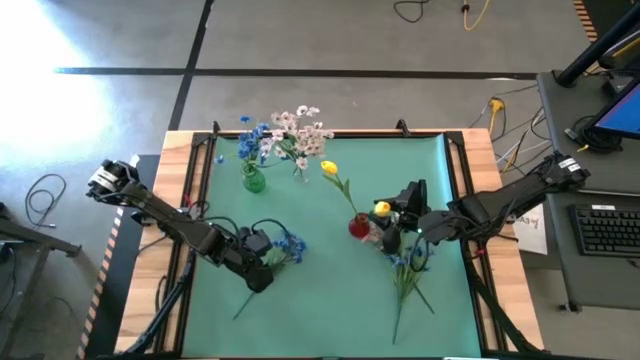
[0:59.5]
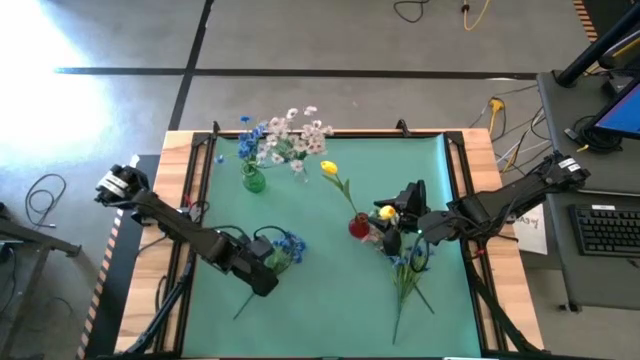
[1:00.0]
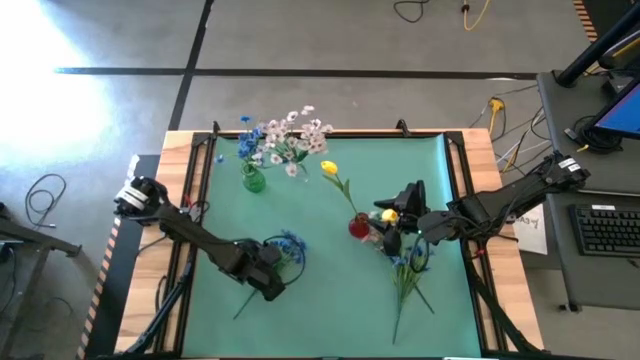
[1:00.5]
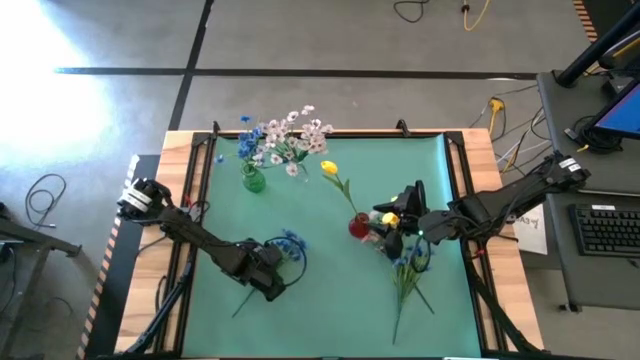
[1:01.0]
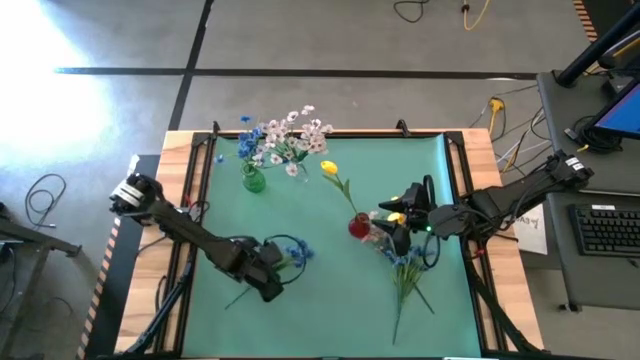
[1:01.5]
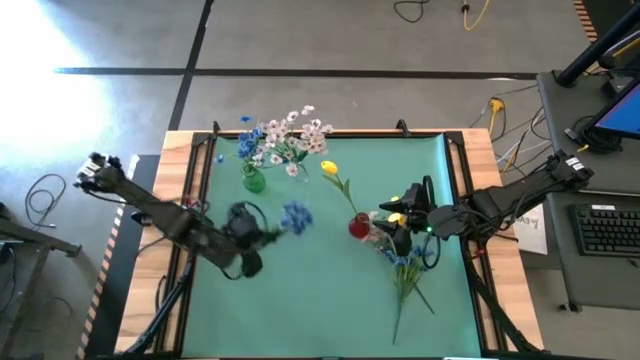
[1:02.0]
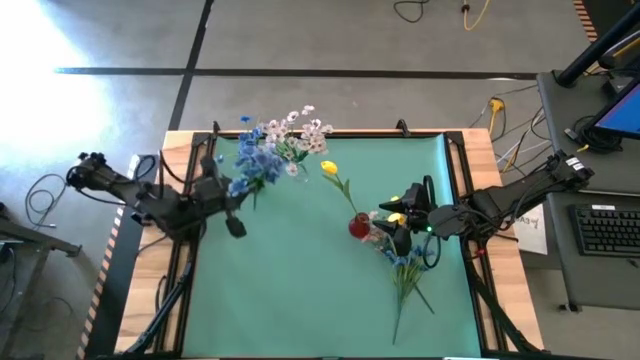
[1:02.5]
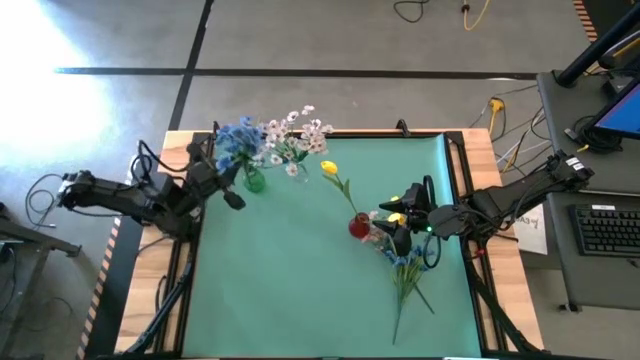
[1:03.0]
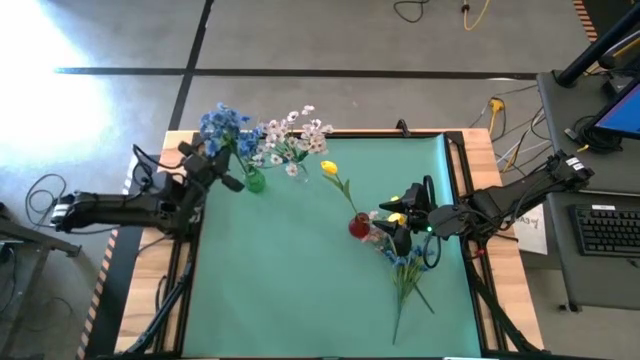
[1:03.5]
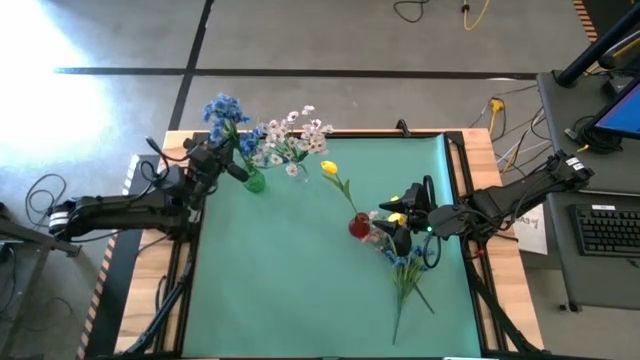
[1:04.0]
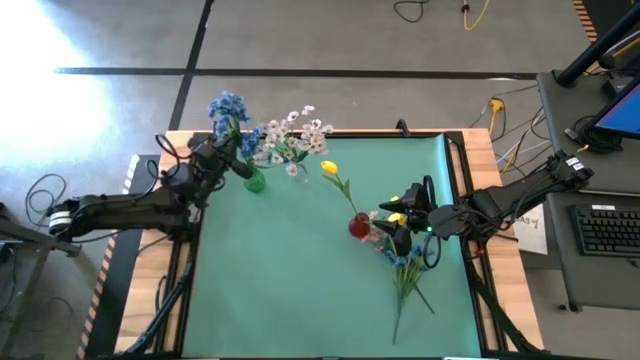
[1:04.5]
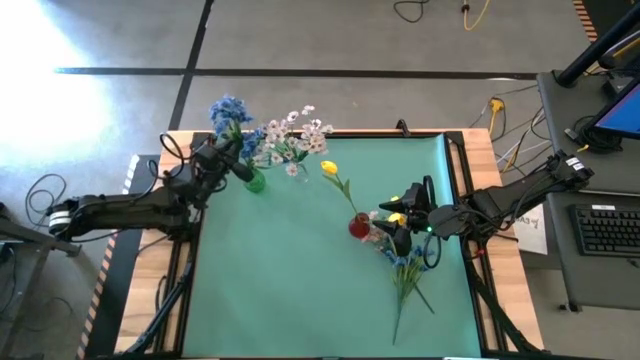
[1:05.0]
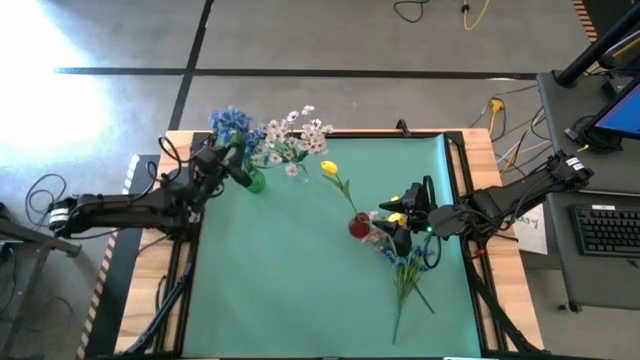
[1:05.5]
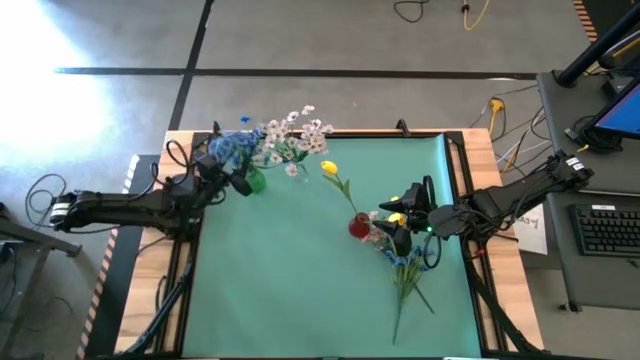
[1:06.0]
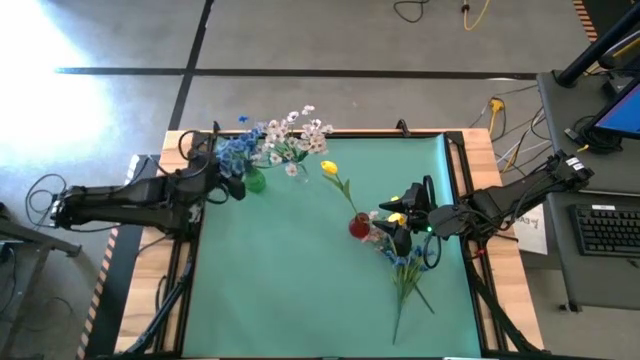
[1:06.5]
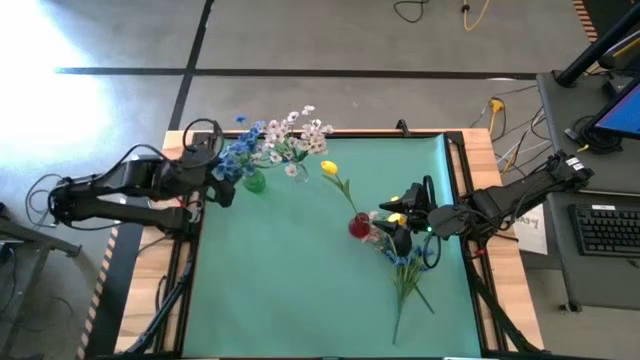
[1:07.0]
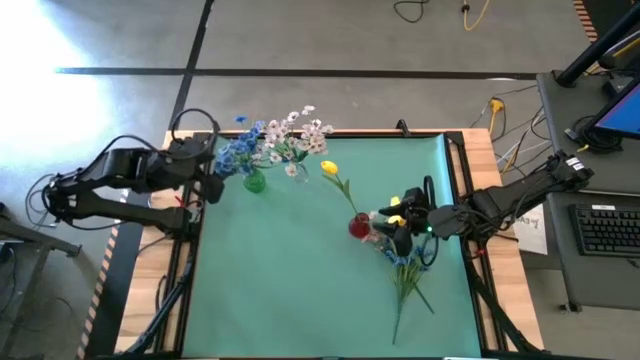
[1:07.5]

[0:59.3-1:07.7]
Task: Sort flowers into vase by color
Put the left blue flowers into the green vase

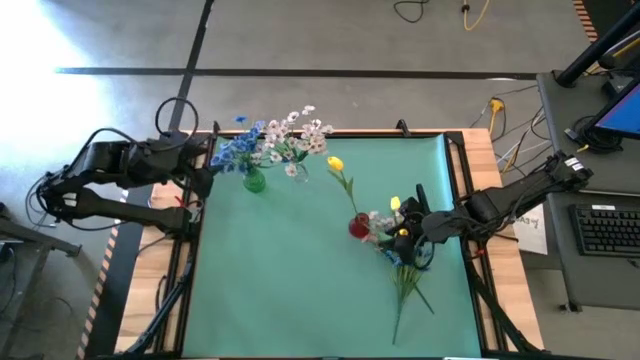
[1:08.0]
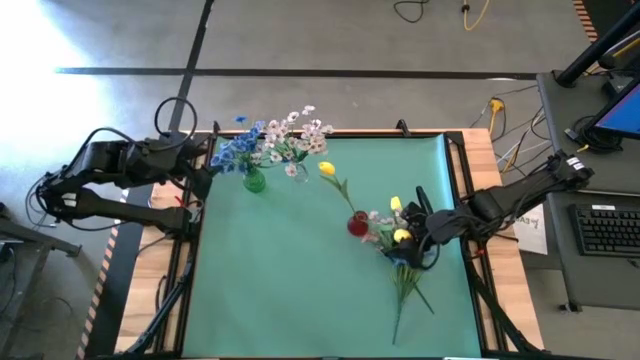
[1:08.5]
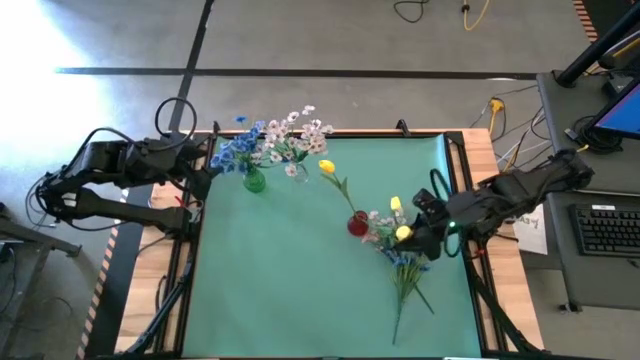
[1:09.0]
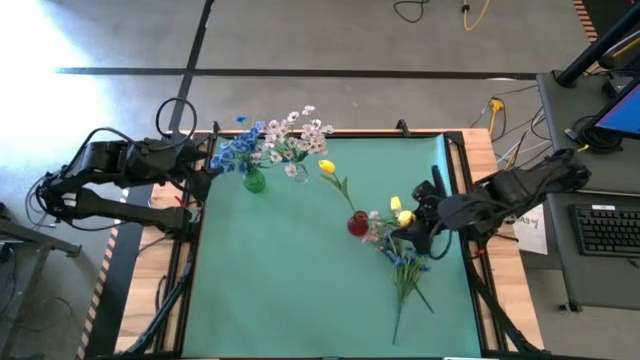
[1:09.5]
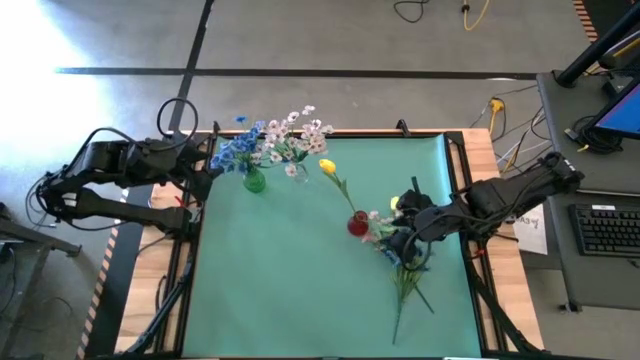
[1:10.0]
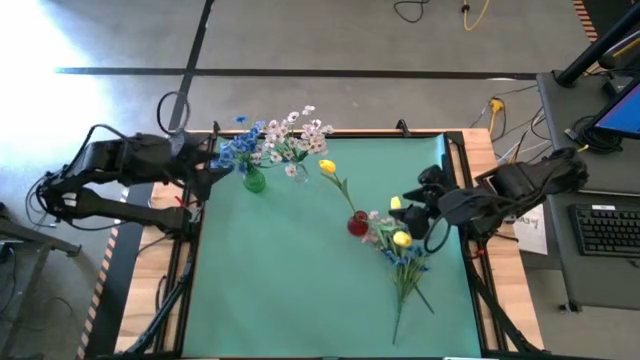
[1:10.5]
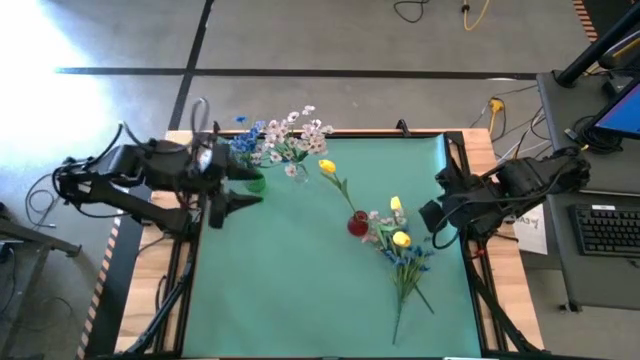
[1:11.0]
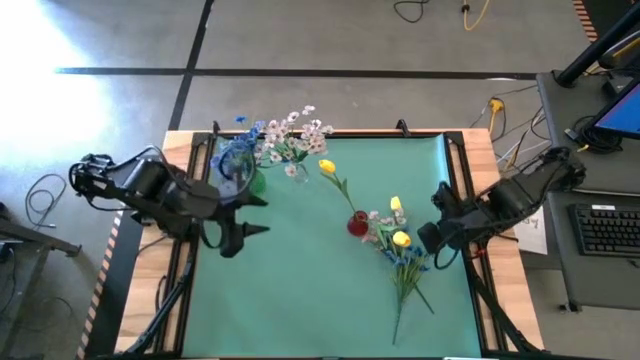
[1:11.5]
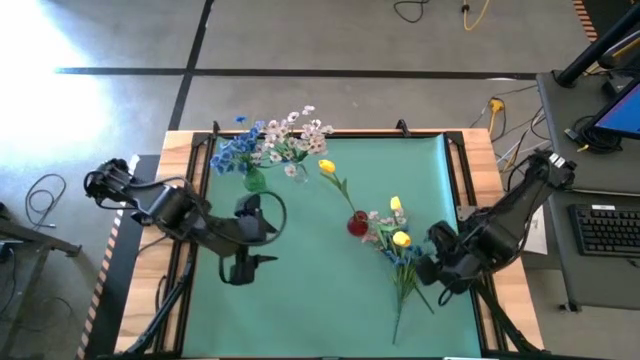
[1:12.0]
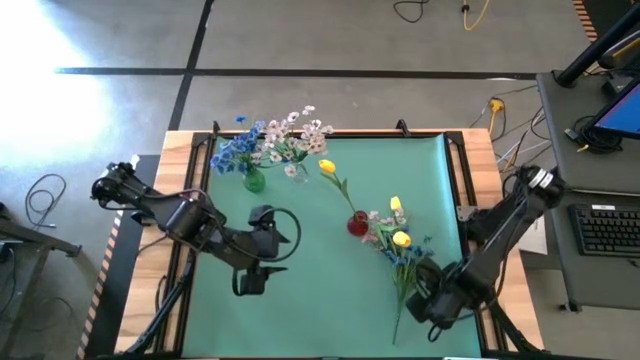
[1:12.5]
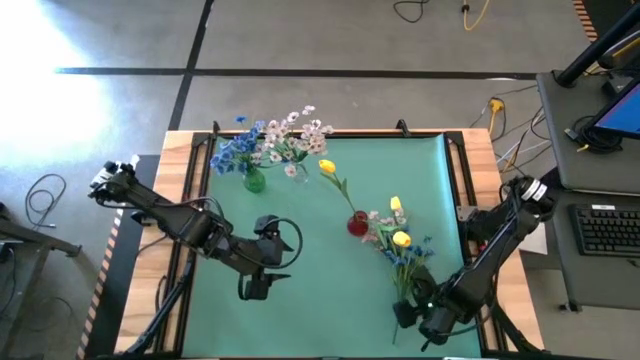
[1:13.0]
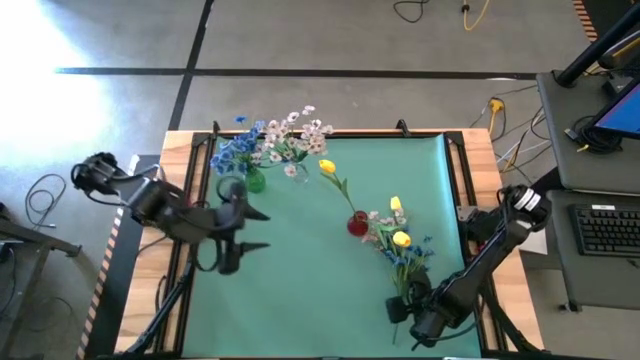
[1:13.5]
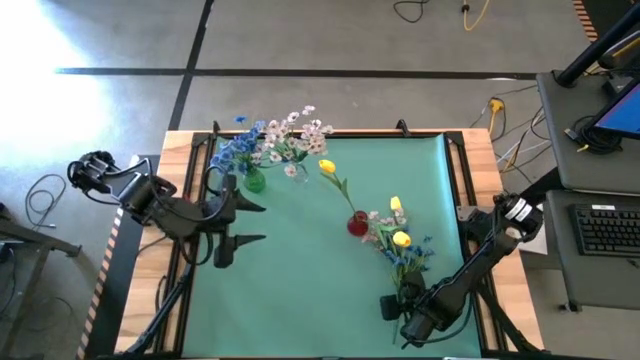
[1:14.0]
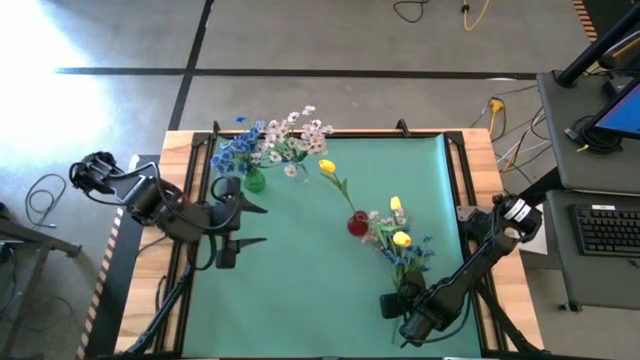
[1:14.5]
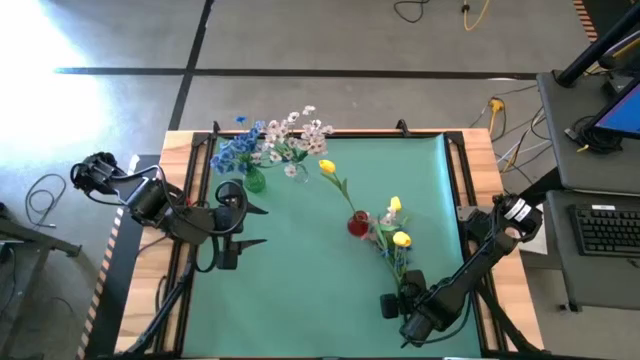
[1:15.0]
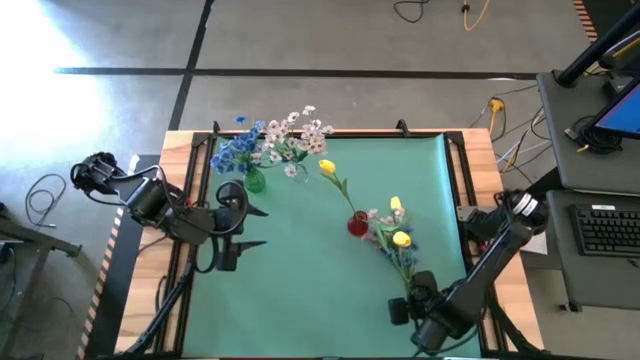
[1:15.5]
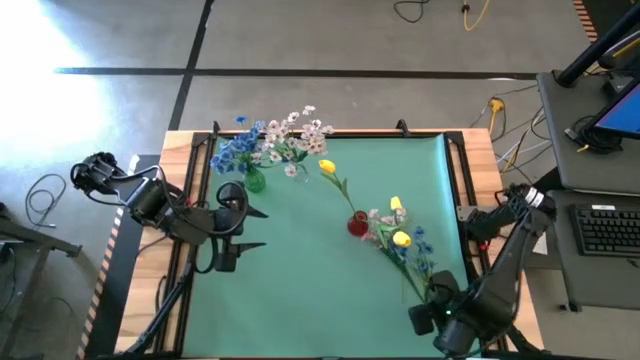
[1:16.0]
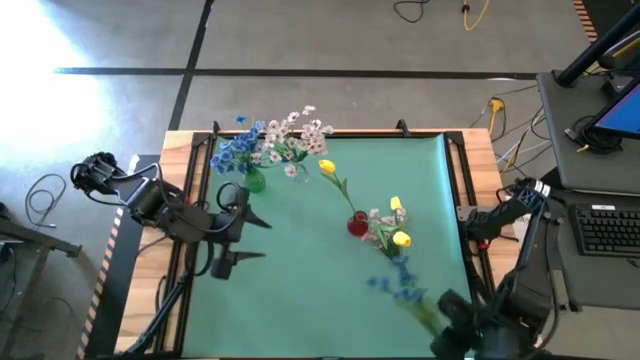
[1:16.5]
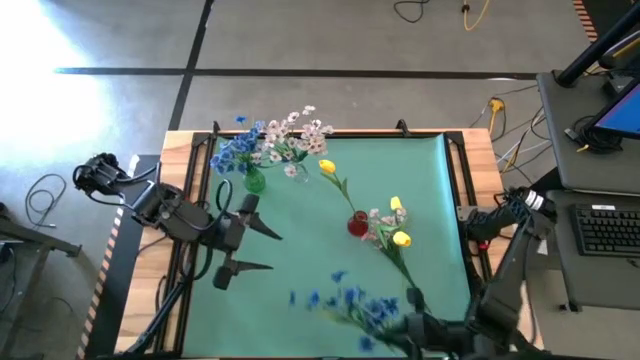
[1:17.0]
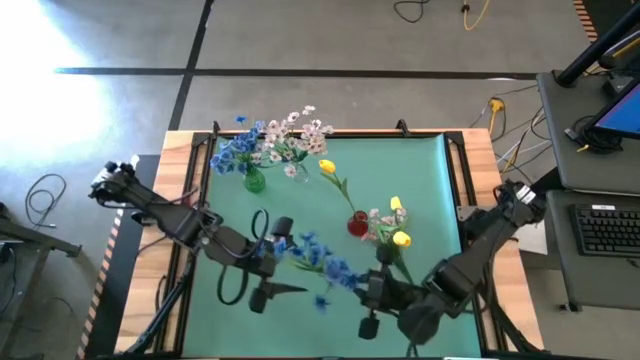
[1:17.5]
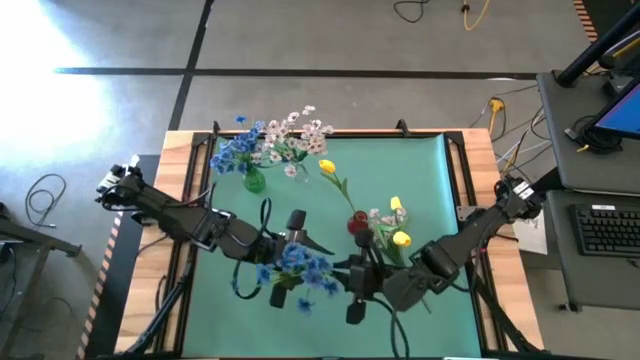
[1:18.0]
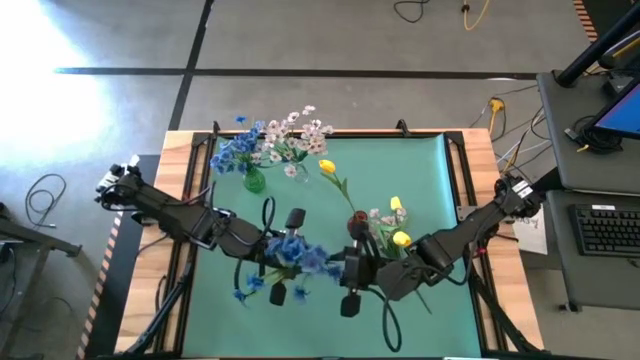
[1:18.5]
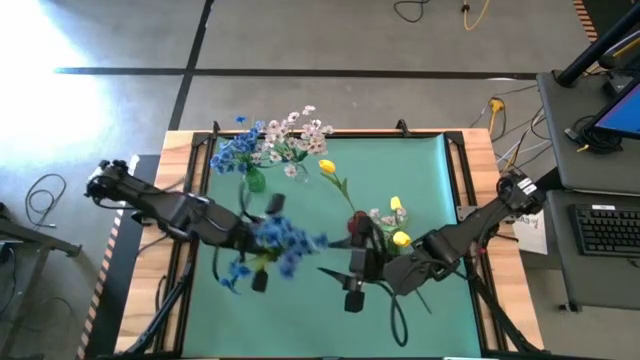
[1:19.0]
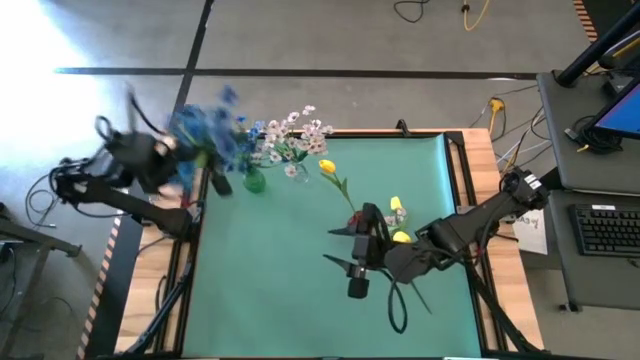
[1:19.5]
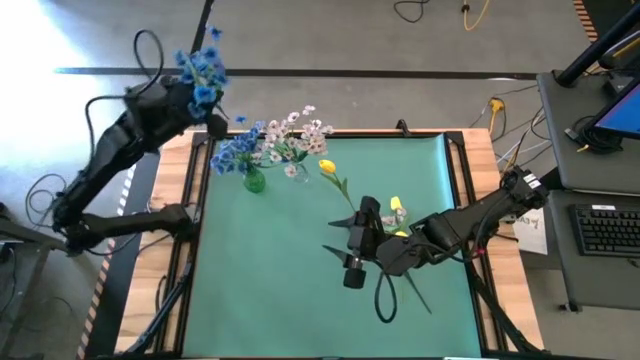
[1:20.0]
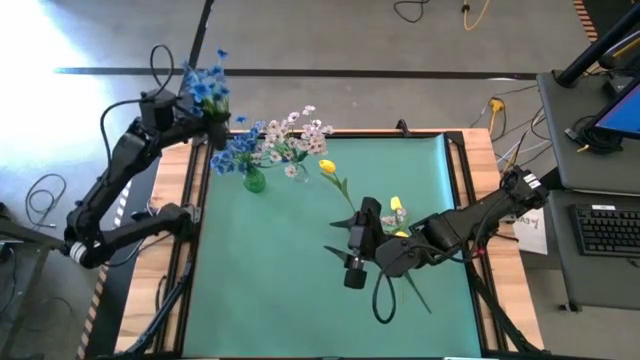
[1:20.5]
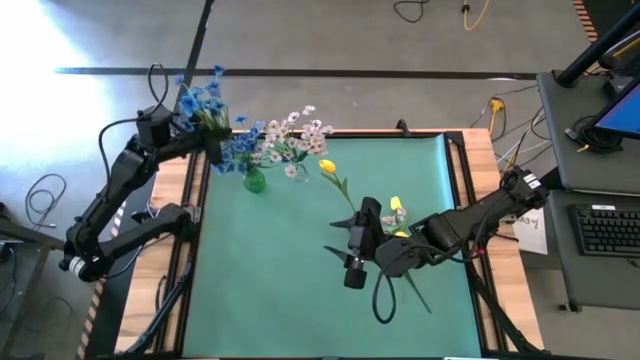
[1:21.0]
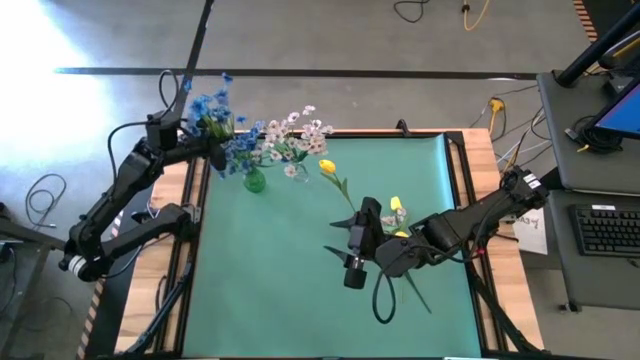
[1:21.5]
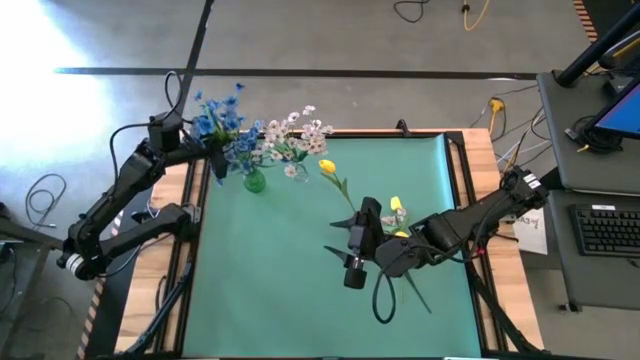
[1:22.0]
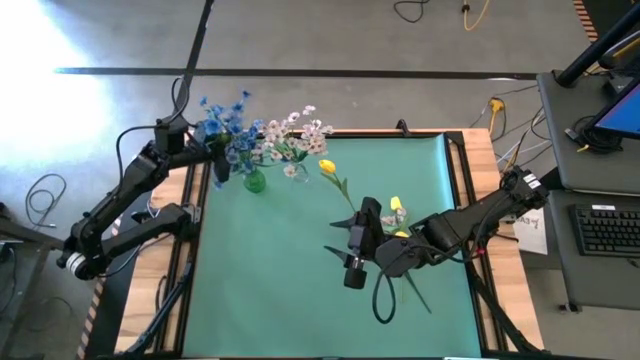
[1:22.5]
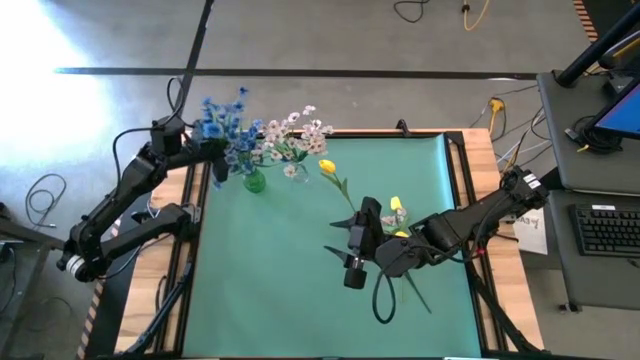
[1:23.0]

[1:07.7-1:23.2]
Put the blue flowers into the green vase
